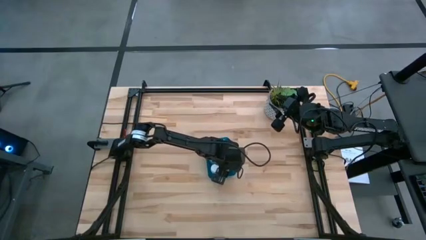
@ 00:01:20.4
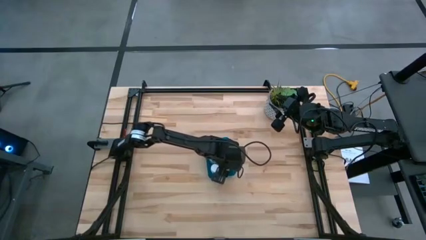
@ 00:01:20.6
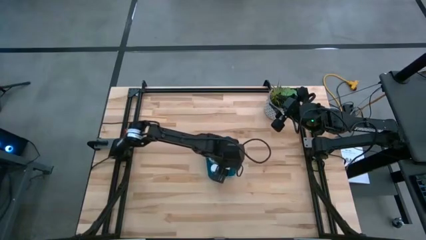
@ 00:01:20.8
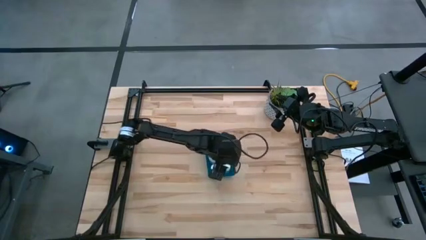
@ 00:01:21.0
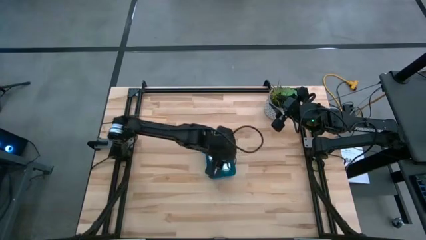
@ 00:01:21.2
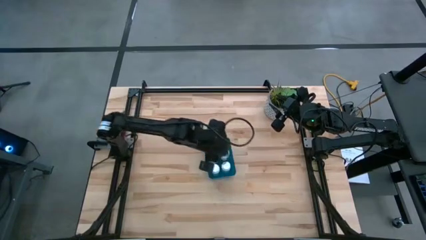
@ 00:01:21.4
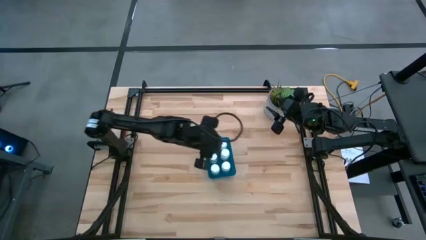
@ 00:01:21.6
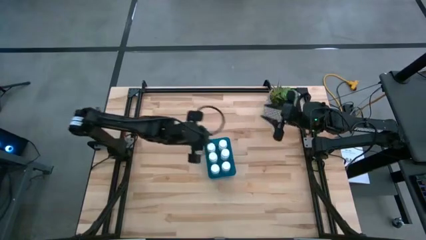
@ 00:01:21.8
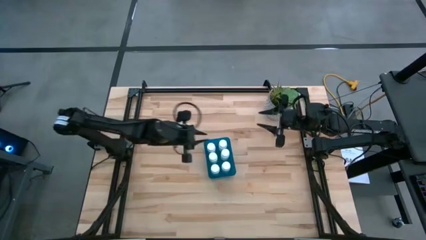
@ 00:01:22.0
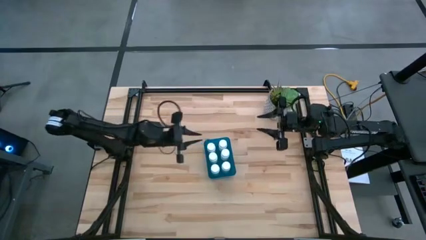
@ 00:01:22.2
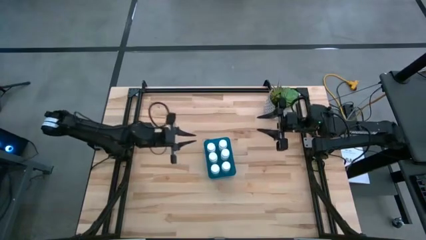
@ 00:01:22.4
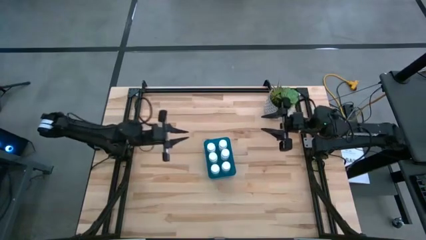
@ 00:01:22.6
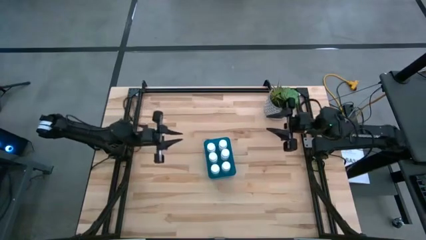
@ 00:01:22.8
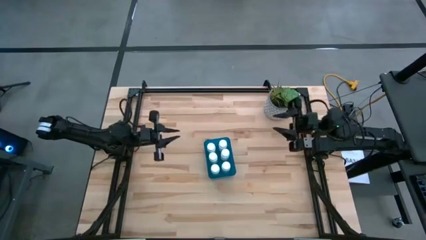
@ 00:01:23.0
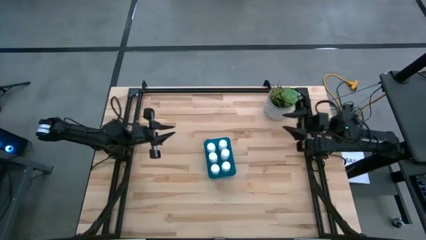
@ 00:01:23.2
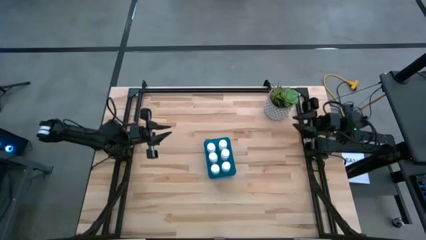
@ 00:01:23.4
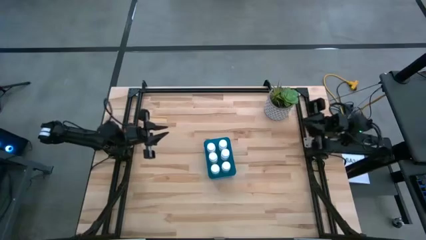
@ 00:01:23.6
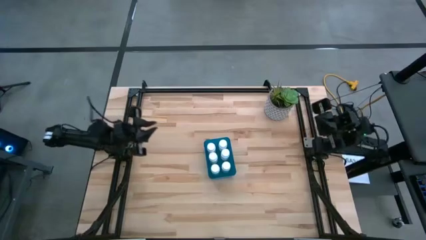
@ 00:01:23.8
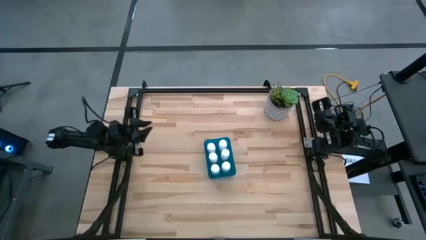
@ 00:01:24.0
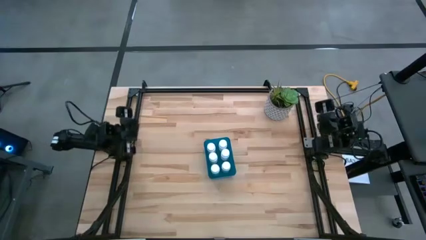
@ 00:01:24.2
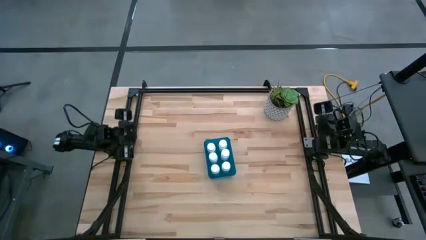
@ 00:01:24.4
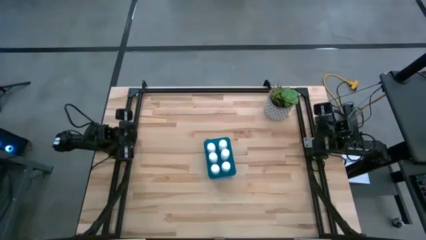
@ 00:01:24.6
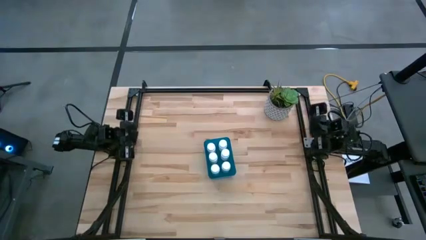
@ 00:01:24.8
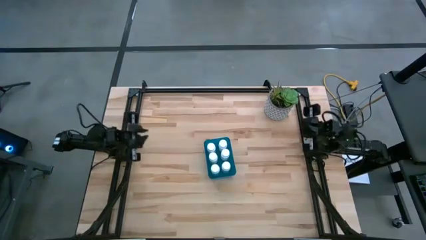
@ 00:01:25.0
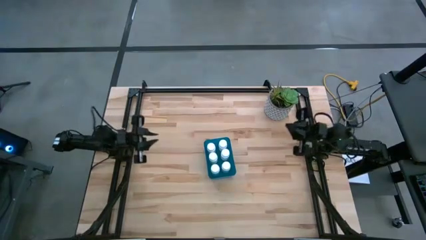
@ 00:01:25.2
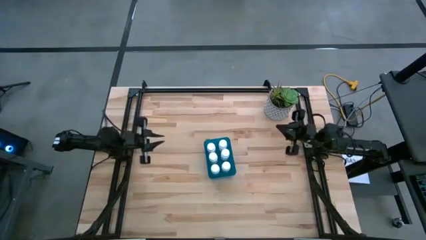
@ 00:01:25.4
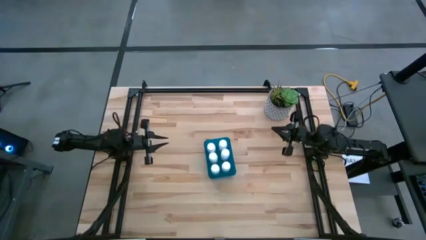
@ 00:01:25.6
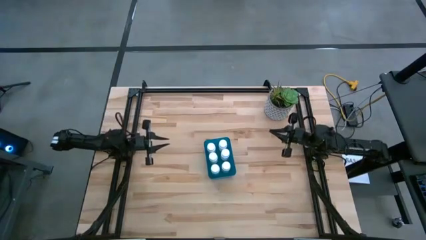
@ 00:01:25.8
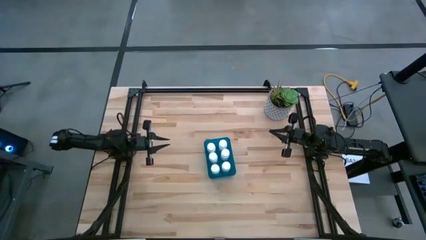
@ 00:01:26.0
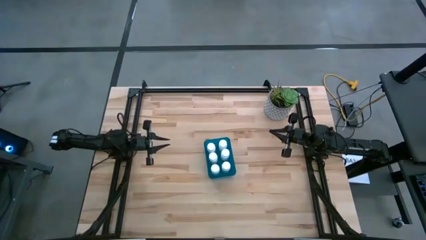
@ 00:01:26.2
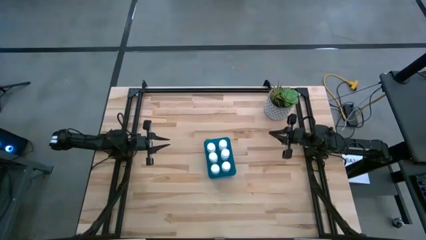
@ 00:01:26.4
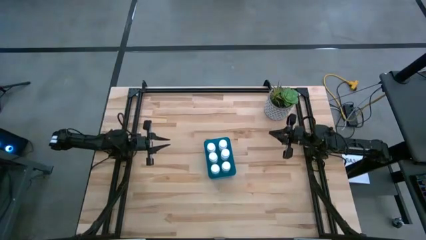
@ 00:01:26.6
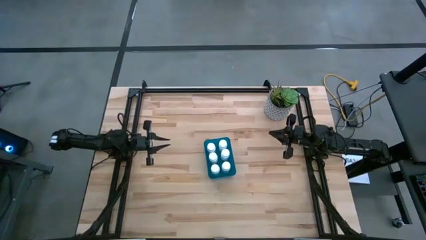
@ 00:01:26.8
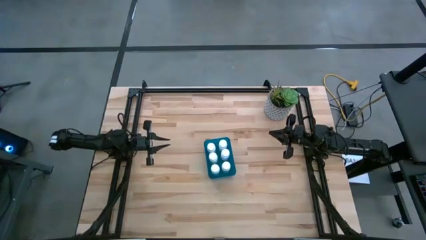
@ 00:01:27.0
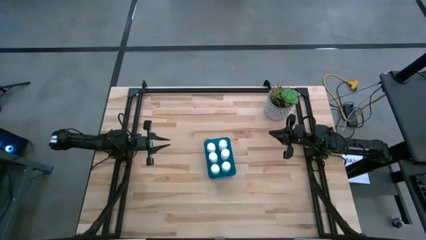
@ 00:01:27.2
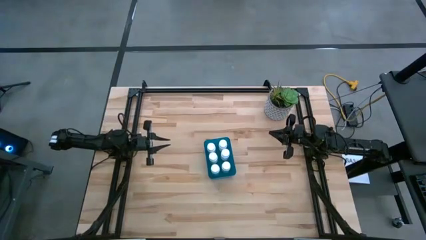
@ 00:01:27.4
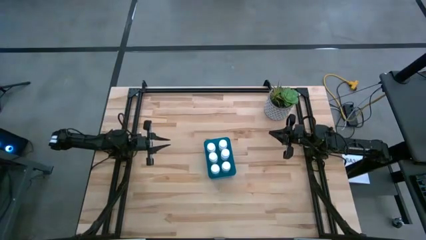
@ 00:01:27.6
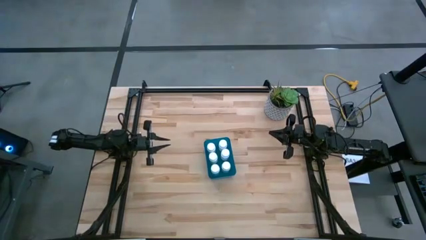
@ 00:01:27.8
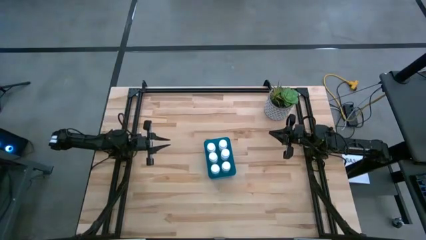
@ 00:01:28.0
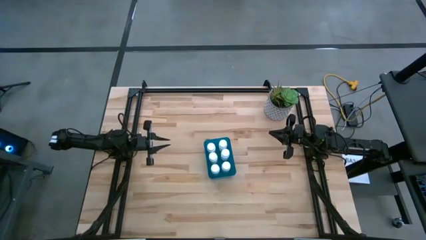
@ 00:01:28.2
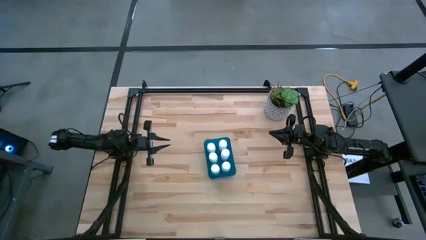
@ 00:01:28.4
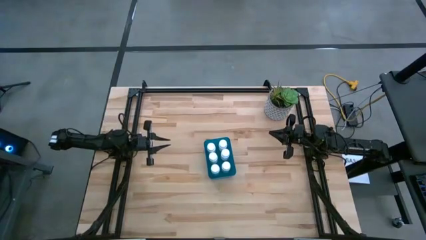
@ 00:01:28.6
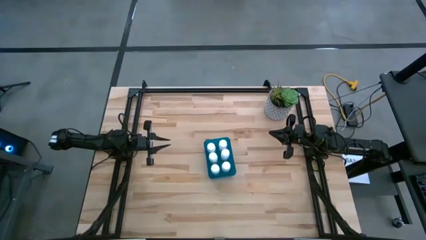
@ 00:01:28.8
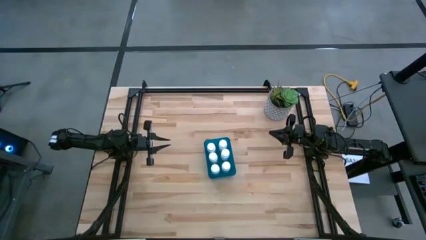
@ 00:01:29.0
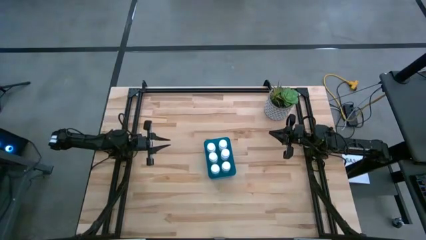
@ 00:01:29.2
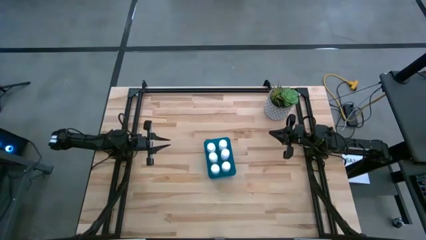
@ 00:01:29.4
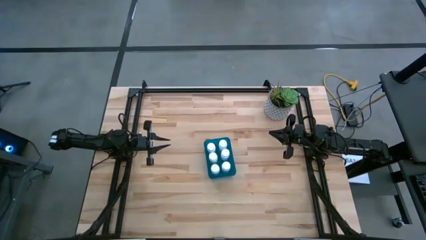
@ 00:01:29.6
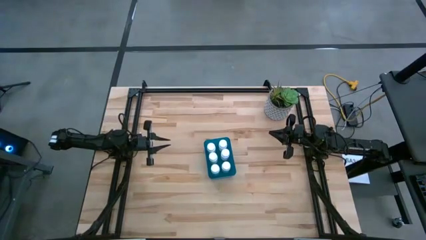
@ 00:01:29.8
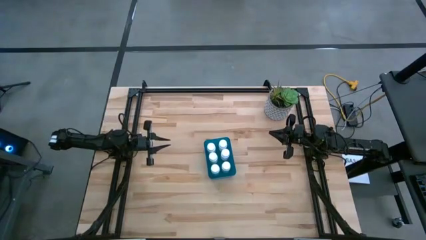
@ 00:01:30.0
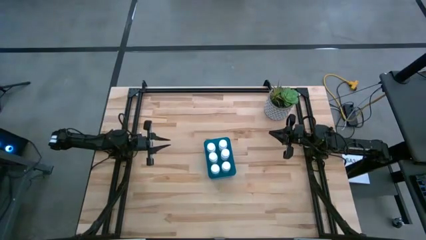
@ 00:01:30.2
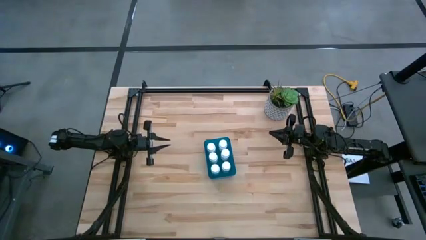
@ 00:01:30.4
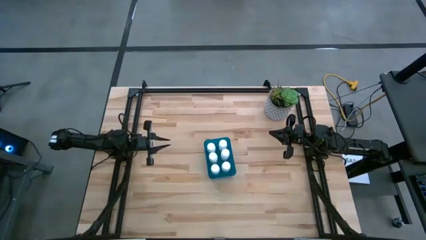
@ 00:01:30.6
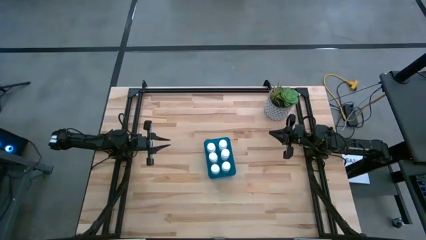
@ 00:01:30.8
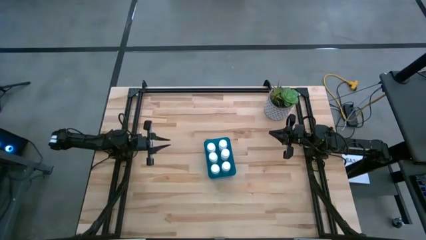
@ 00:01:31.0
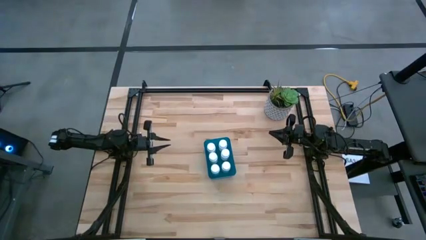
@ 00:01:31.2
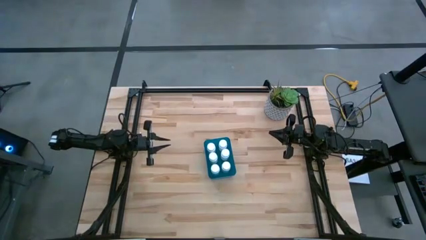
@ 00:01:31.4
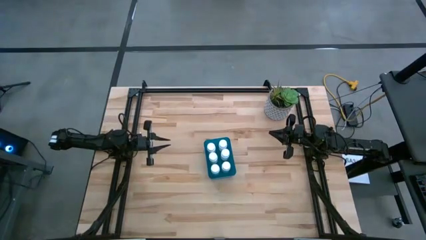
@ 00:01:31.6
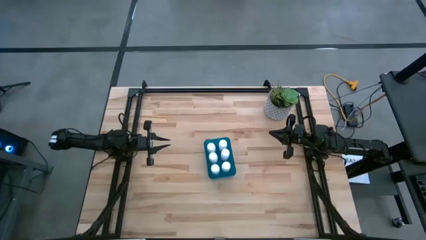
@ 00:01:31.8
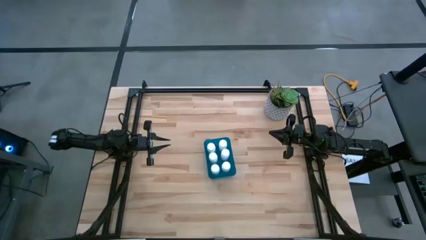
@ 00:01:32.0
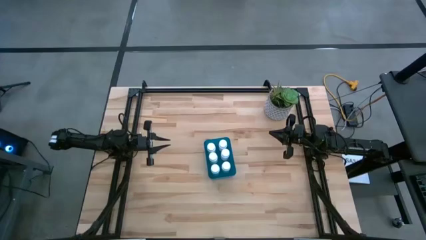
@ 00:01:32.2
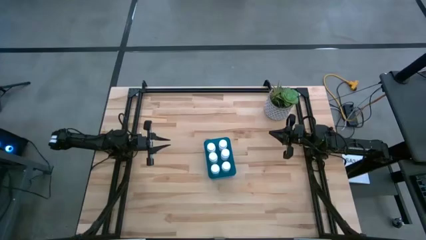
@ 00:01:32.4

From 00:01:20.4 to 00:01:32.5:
Task: Pick and place pill bottles into a basket
Return to Home Position
